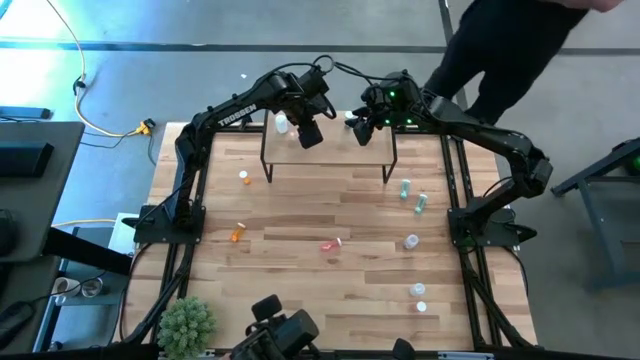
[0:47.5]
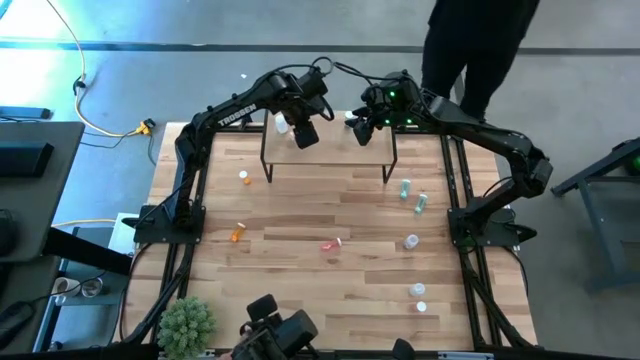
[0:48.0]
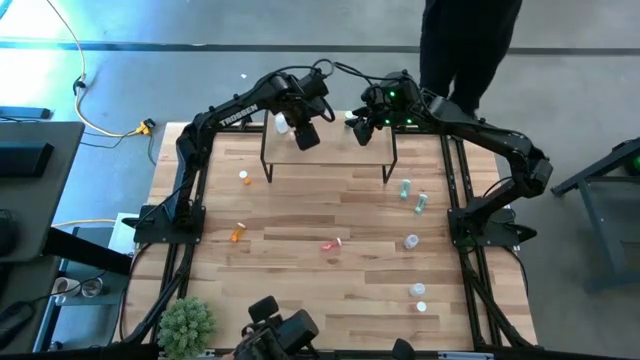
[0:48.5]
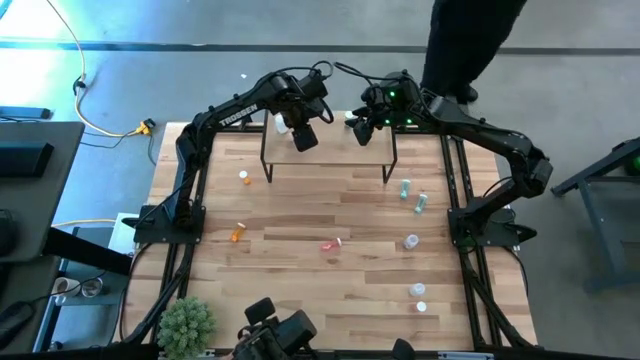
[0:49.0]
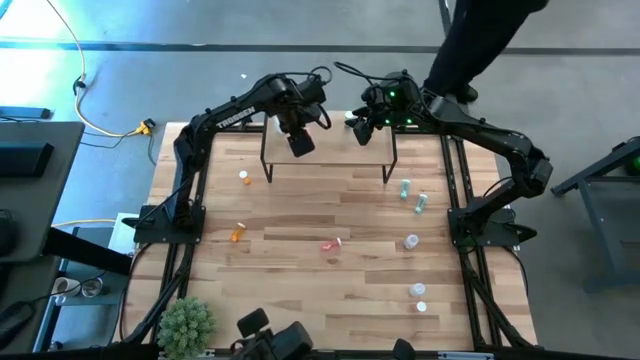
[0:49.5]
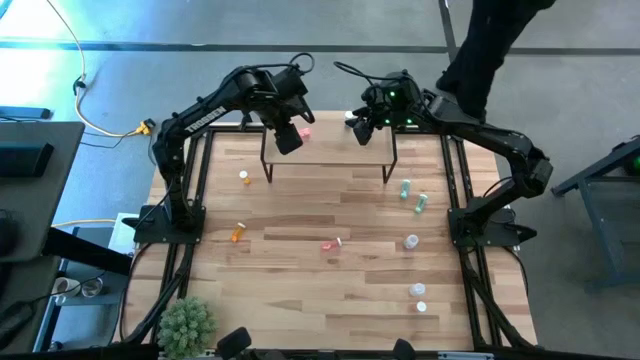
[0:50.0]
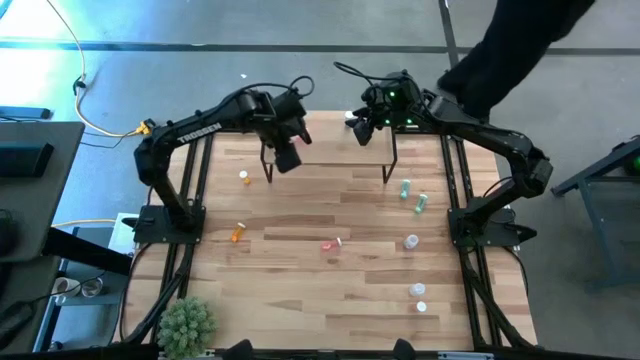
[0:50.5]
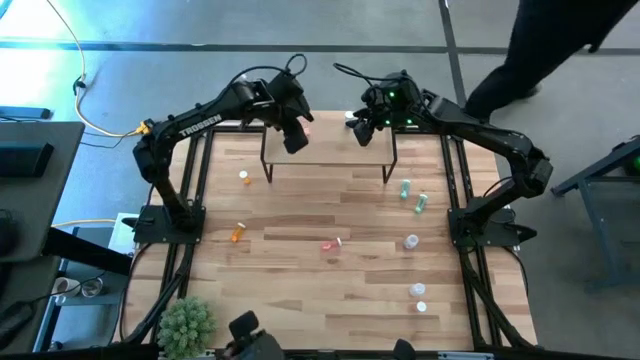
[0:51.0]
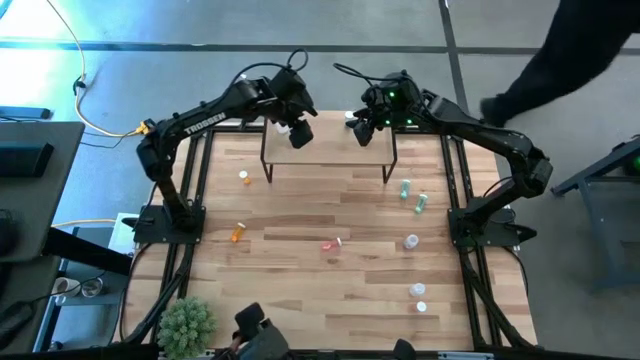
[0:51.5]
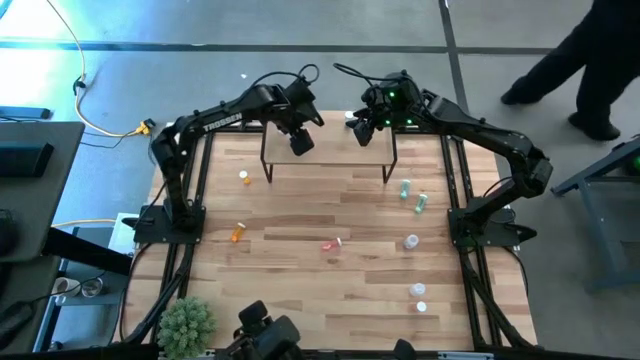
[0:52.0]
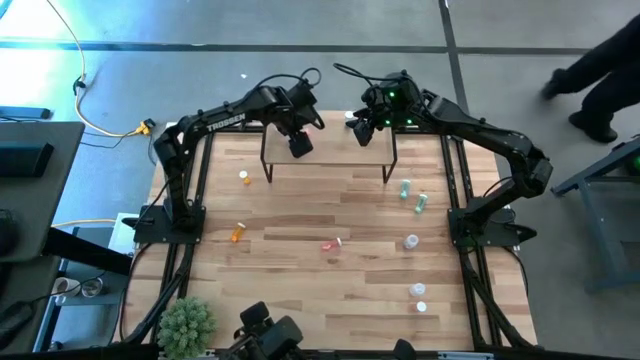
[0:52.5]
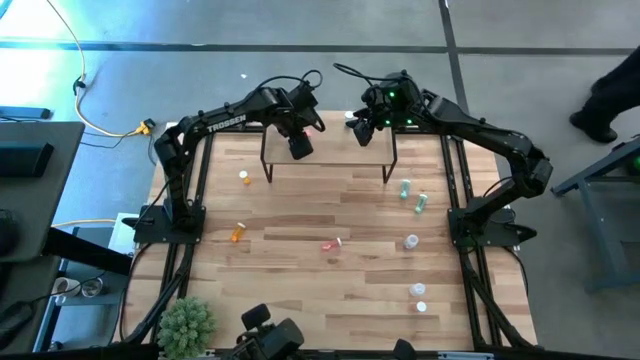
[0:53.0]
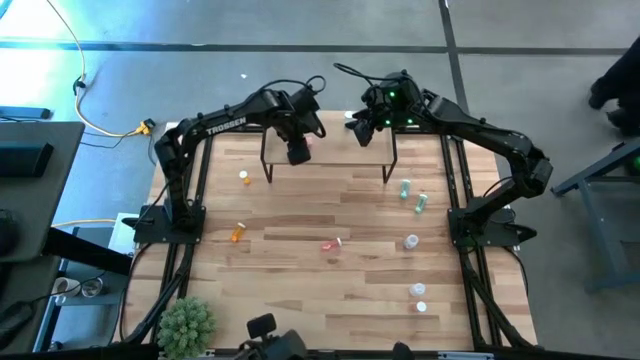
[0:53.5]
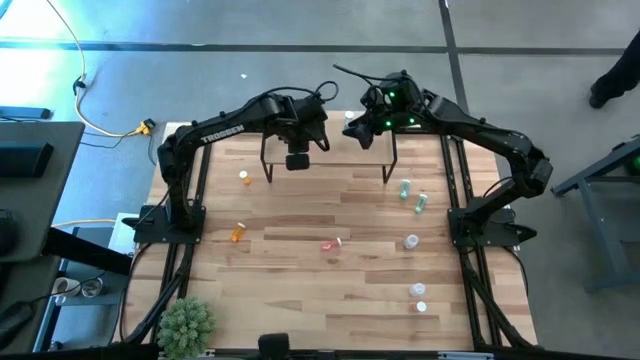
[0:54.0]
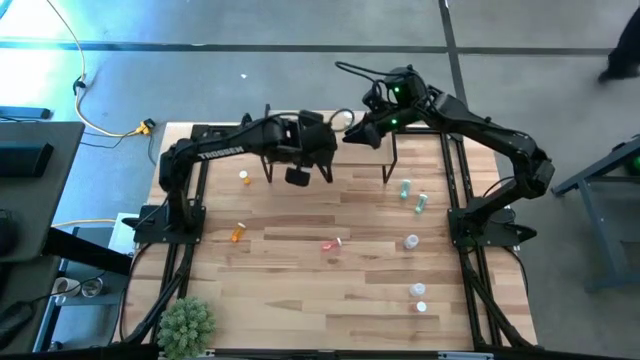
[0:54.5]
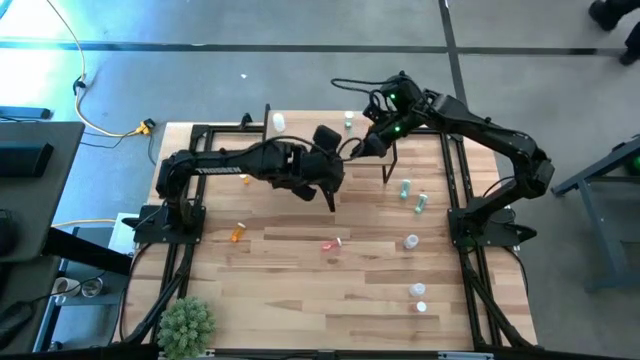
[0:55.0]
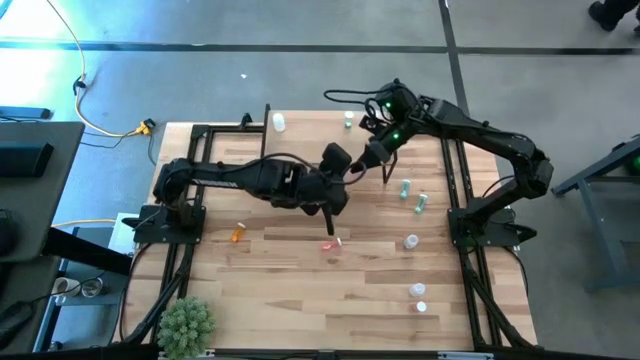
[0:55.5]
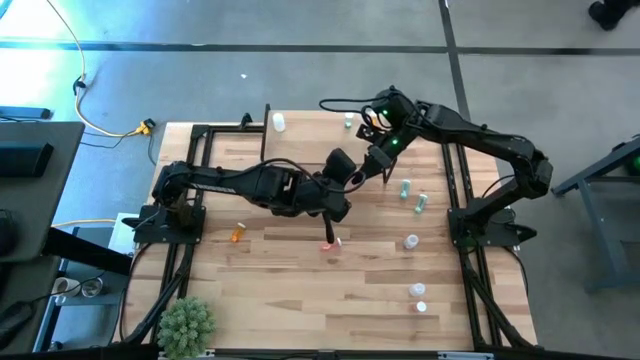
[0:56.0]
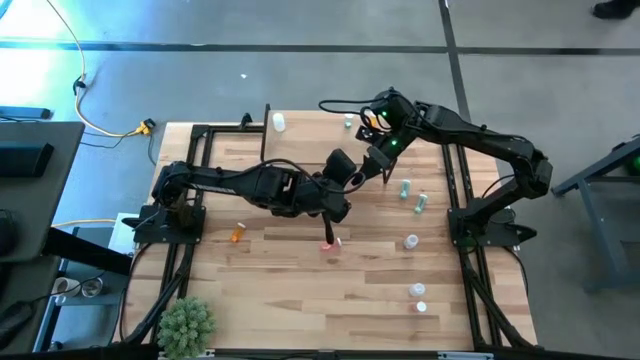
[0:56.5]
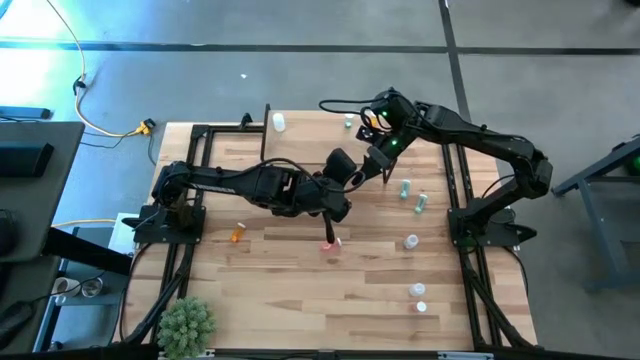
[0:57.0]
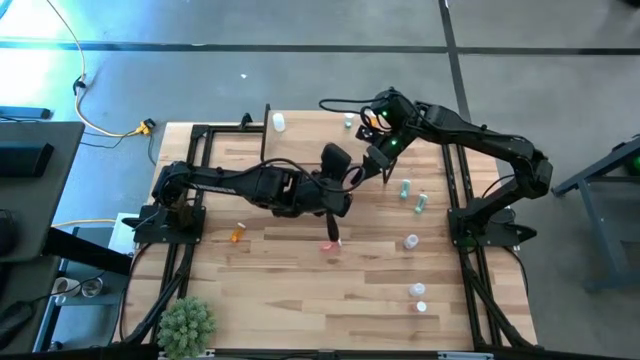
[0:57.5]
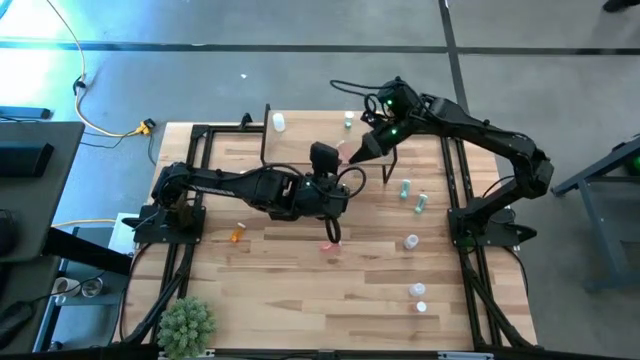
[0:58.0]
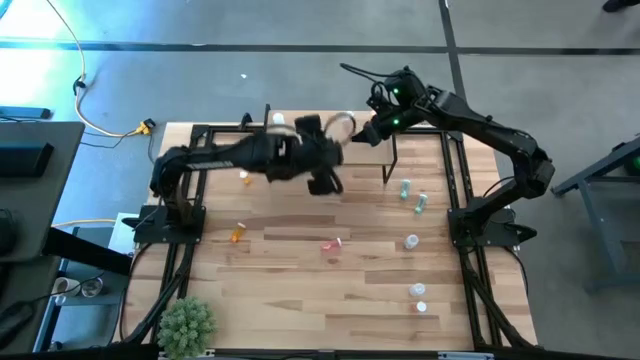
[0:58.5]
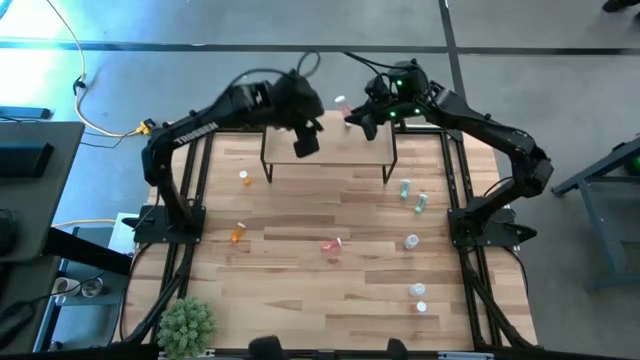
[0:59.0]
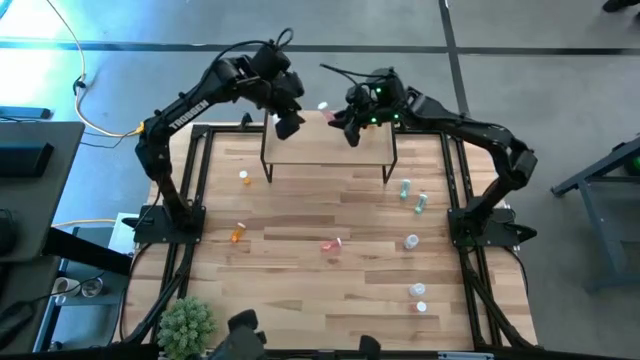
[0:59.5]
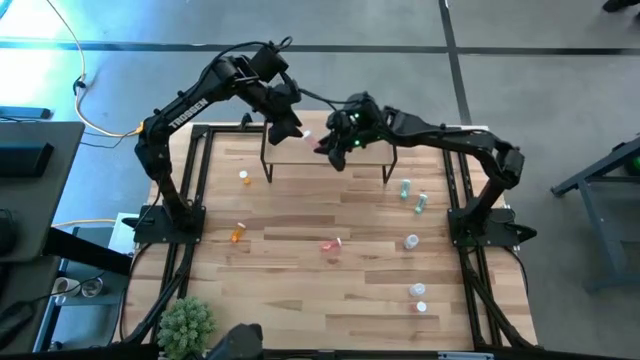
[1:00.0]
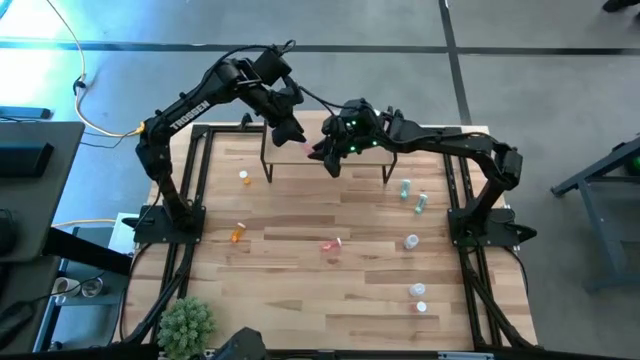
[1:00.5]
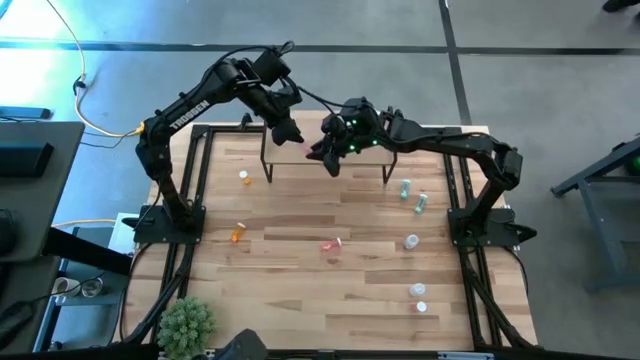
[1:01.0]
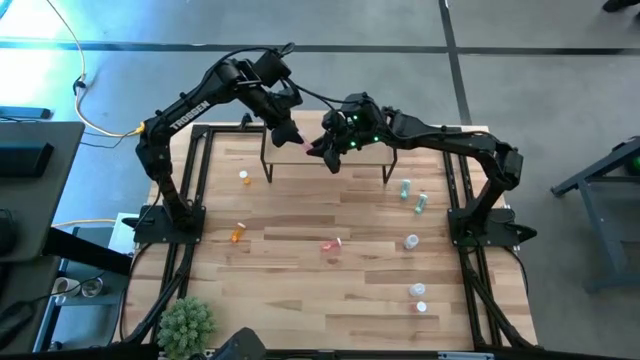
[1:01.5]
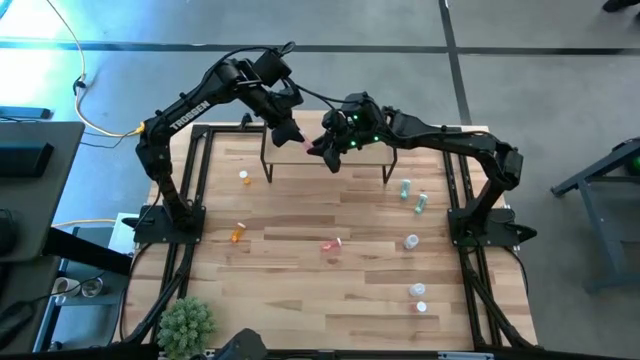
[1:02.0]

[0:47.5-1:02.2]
Task: Pick and place medicine bottles onto shelf by color
Put the top pink pill bottle on the shelf

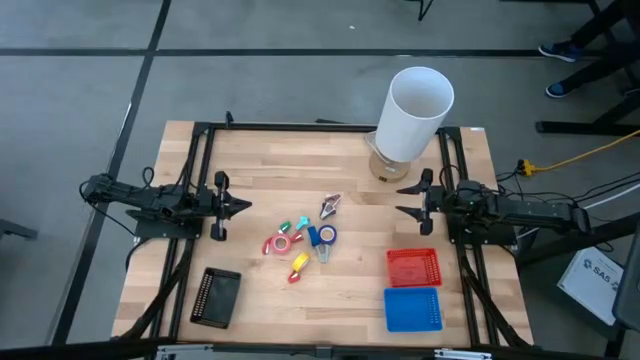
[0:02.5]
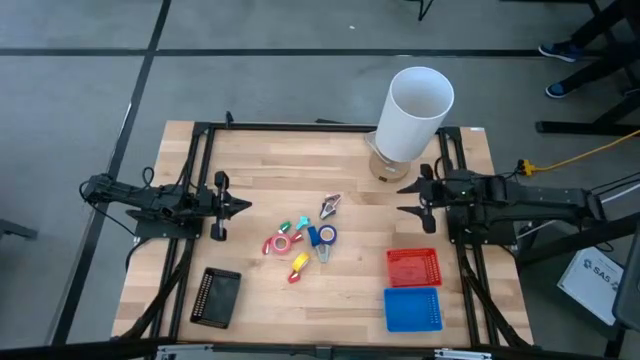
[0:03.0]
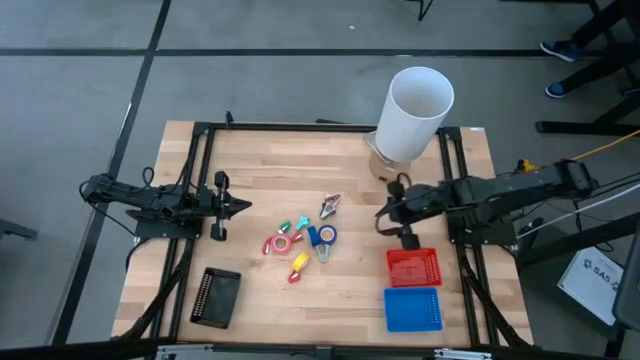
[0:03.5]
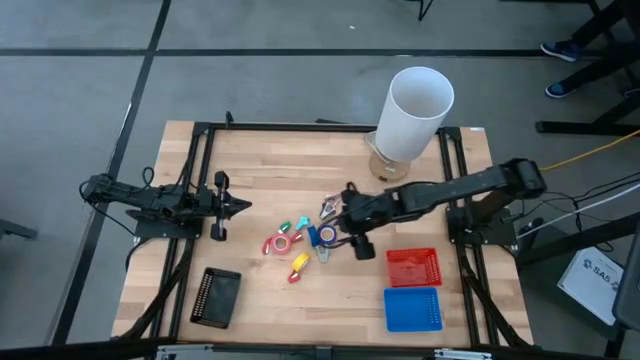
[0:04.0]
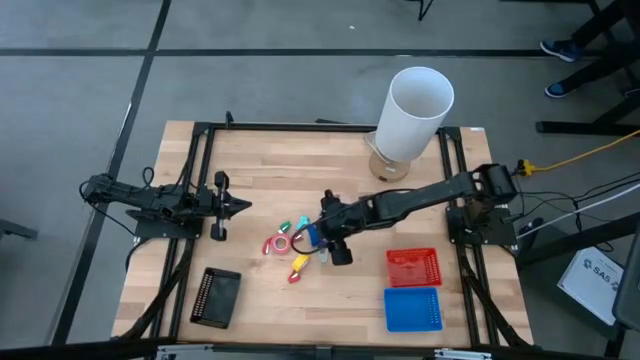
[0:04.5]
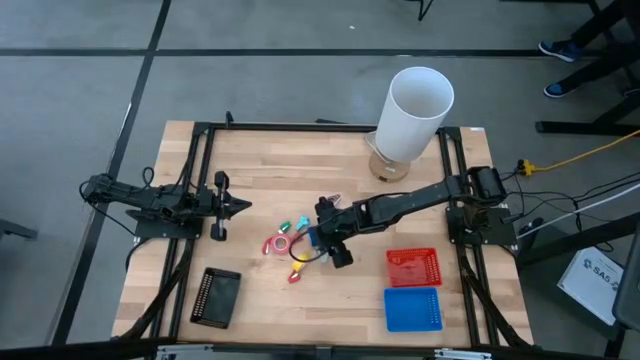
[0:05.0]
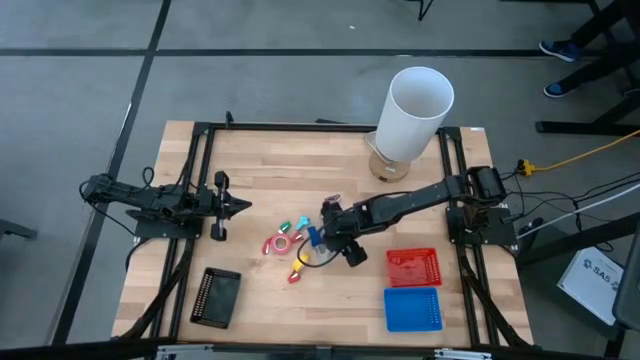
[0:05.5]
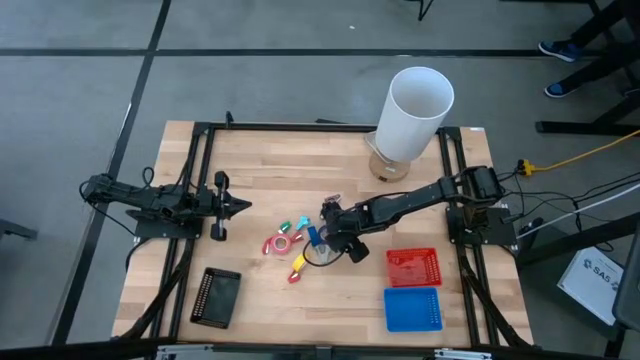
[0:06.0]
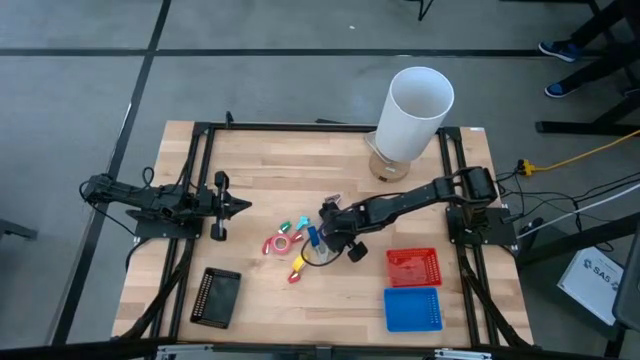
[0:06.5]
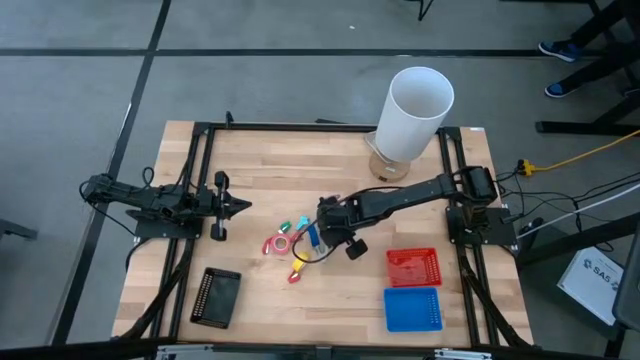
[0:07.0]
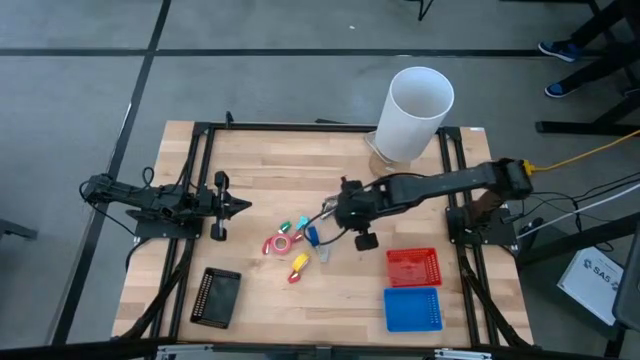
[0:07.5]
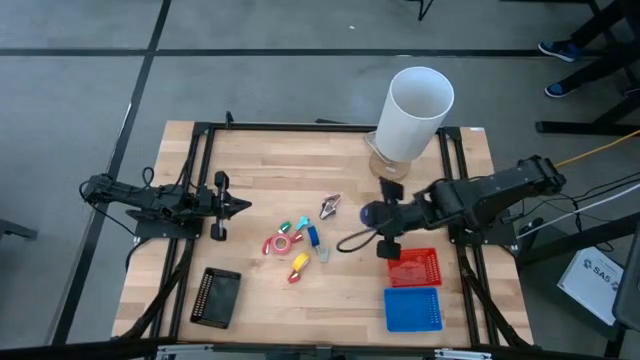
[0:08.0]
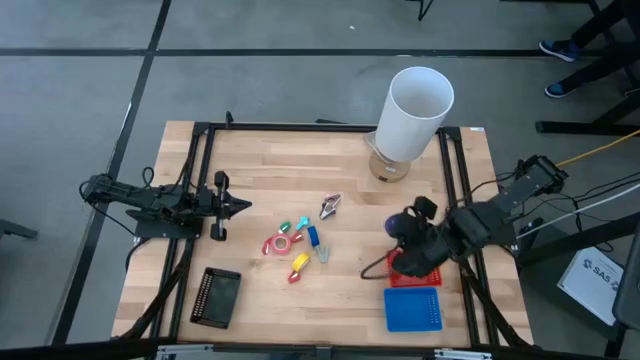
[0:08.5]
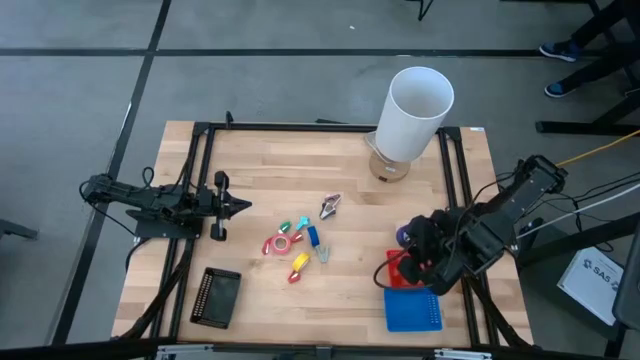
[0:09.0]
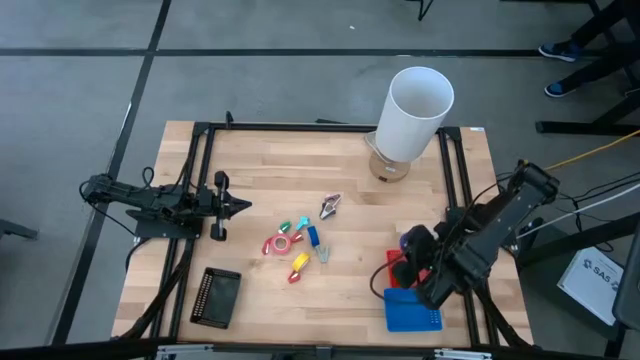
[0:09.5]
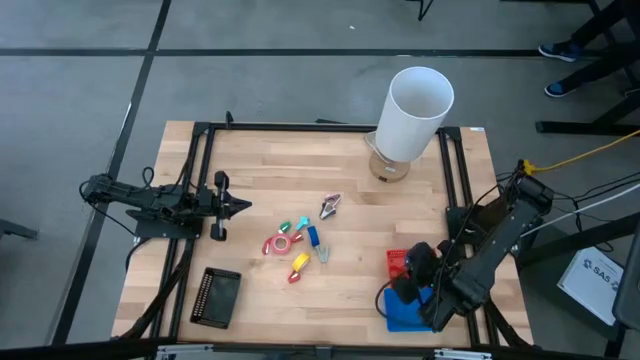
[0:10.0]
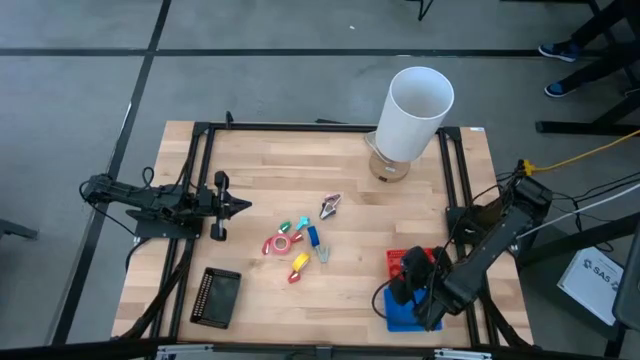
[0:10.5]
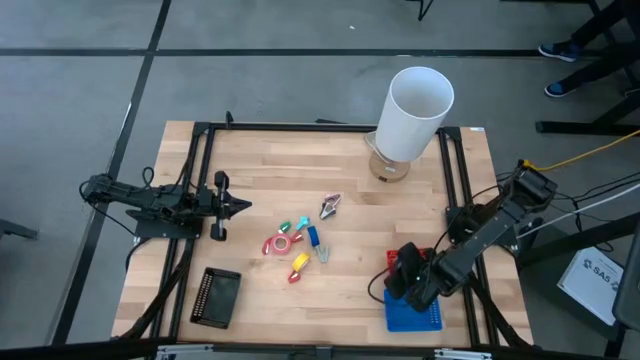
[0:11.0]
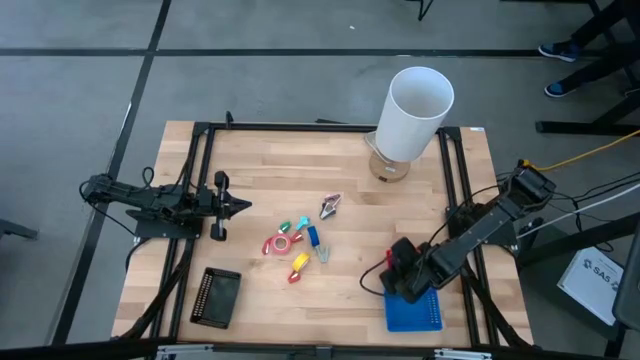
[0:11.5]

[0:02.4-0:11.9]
Task: Pick and place Stapler, Stapler remover, tape
Put the blue tape into the red basket
